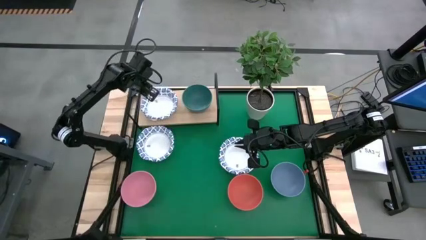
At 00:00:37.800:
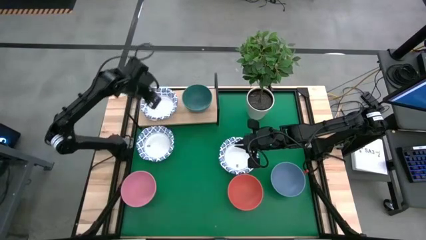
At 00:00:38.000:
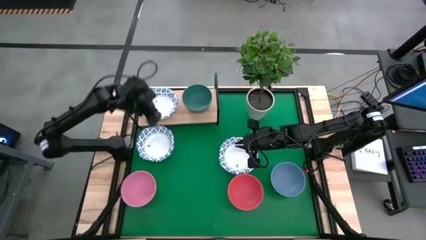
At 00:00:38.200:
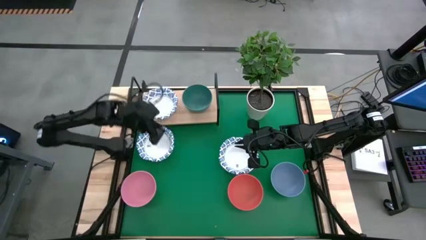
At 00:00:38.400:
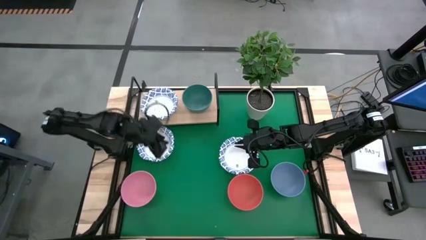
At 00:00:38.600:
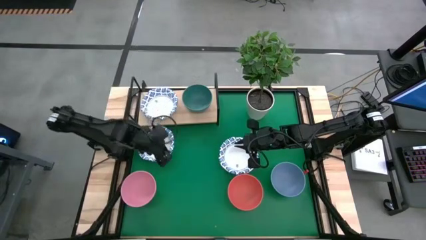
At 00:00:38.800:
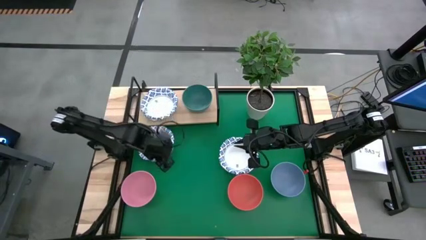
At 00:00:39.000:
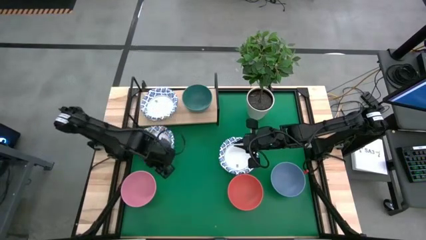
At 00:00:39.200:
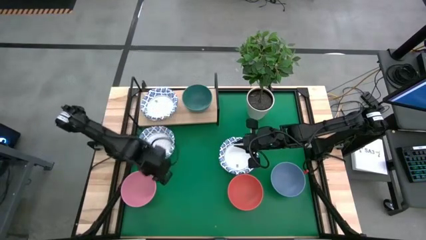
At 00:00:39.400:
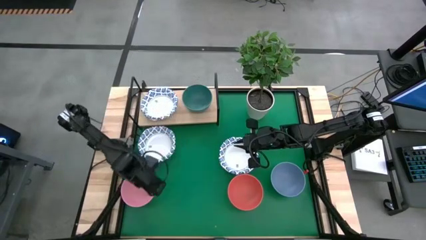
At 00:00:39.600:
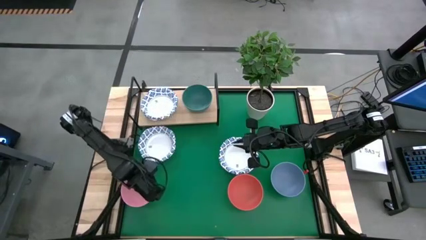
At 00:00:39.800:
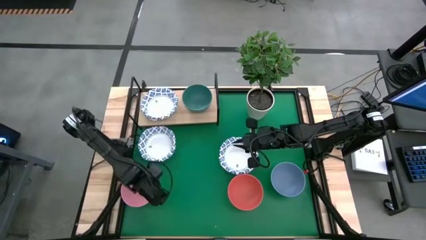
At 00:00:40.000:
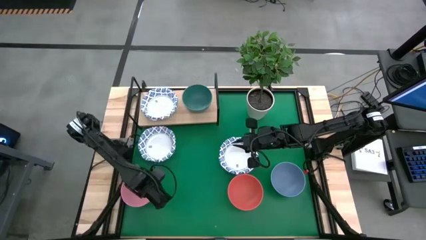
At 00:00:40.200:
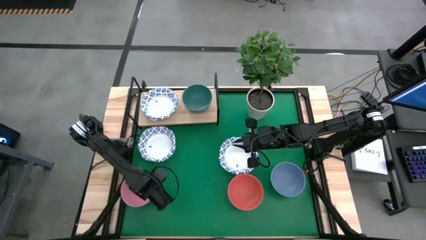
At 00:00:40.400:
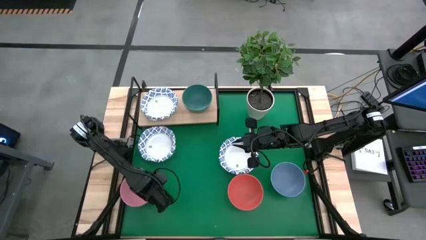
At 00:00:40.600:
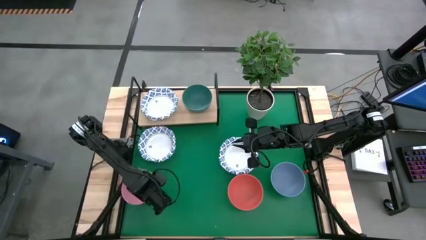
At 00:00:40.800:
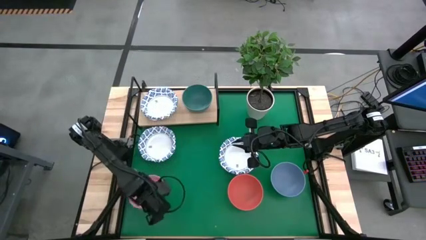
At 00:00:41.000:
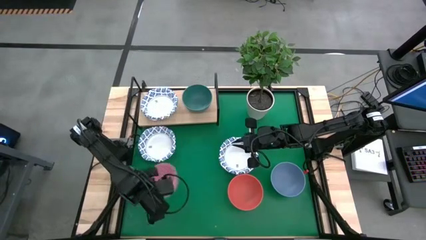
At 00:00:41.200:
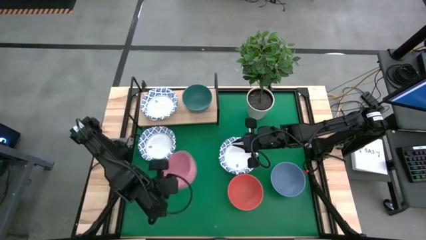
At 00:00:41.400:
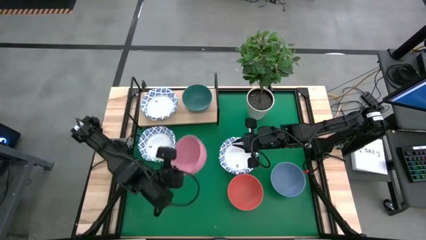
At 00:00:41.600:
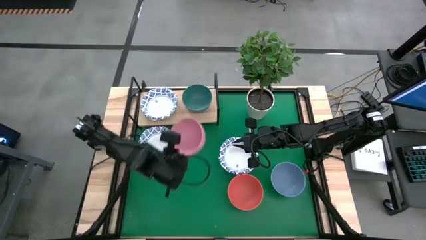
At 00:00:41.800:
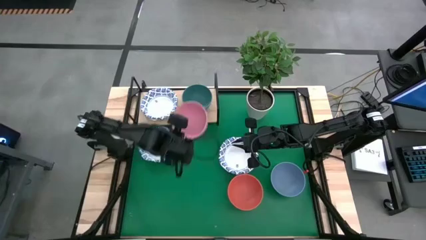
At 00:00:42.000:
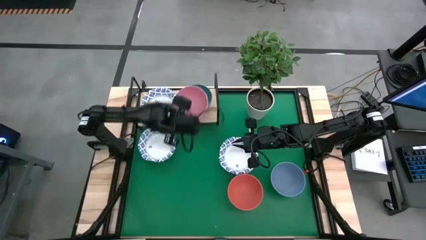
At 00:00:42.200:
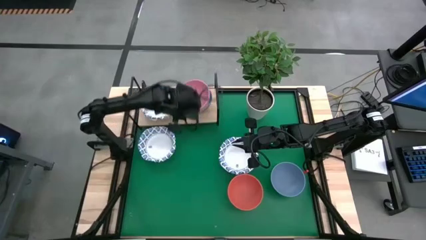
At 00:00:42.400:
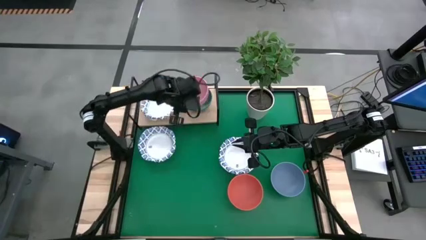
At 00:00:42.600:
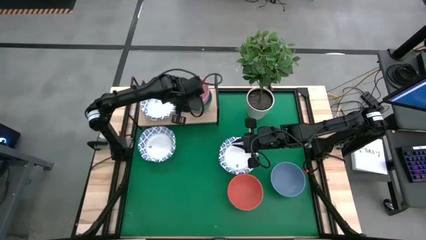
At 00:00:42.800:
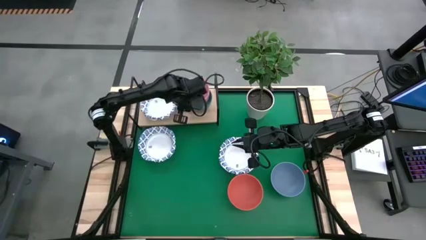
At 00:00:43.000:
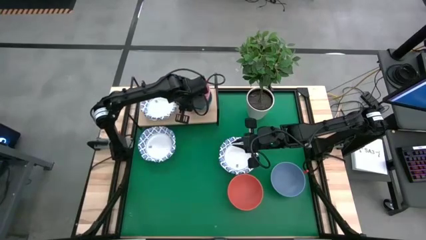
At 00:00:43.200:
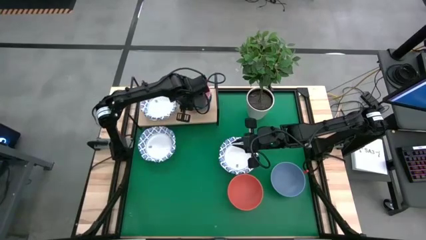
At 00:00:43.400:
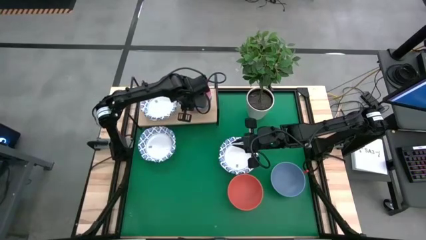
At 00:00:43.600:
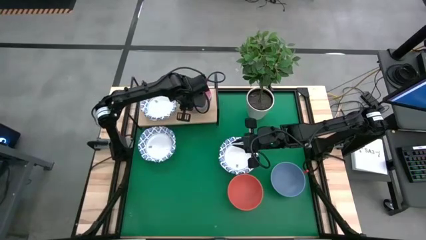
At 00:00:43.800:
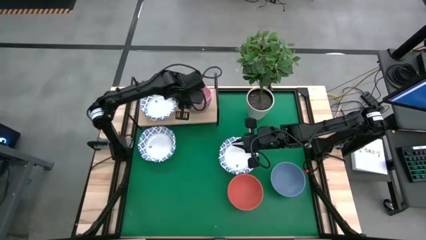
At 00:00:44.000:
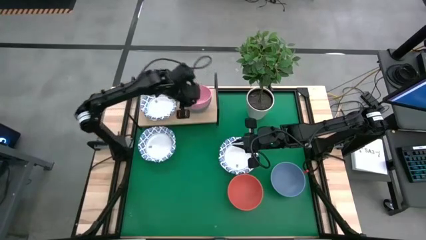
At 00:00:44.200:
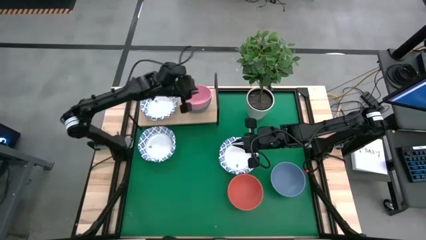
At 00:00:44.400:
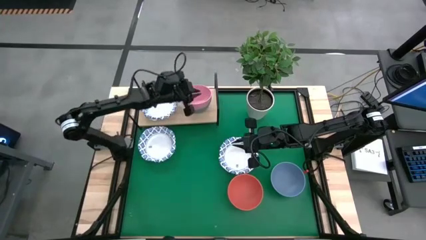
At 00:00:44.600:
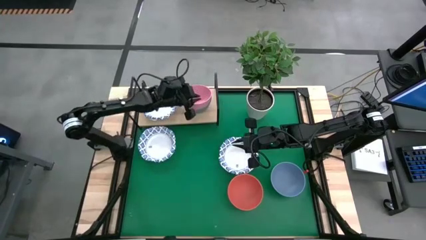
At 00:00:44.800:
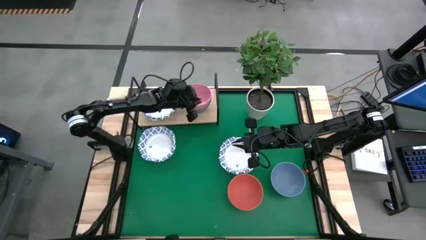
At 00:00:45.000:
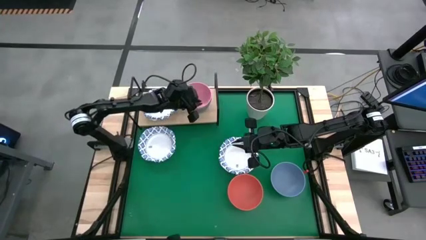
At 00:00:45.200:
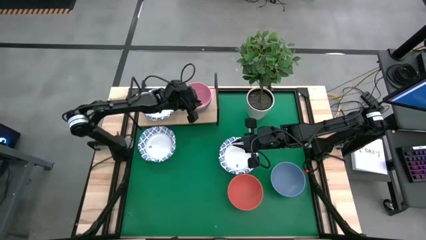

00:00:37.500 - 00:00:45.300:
Task: Place and stack bowls onto a shelf
Stack the pink bowl on top of the green bowl

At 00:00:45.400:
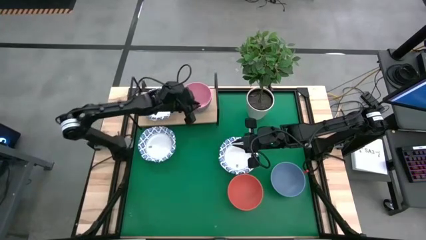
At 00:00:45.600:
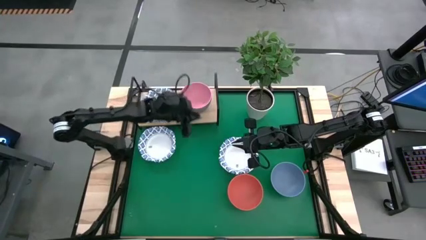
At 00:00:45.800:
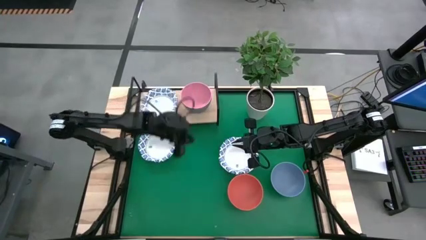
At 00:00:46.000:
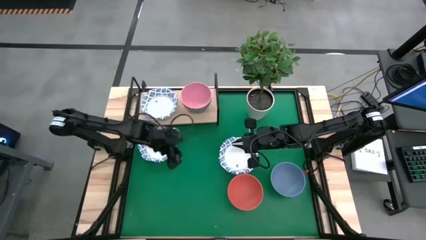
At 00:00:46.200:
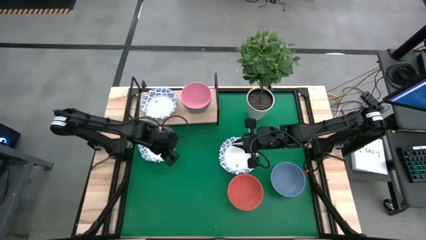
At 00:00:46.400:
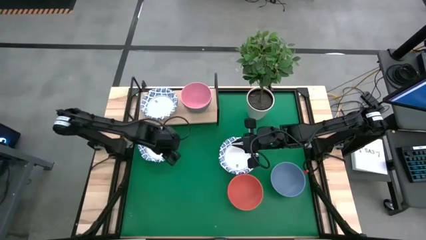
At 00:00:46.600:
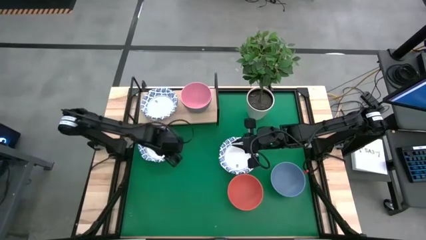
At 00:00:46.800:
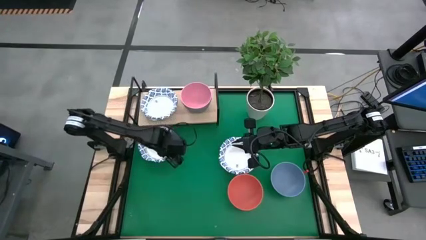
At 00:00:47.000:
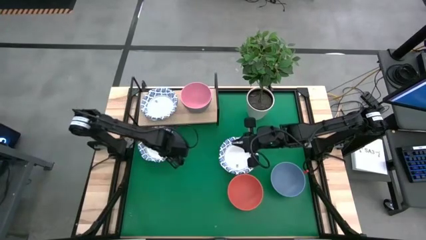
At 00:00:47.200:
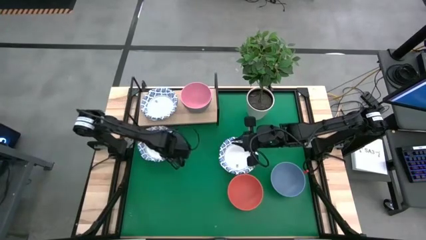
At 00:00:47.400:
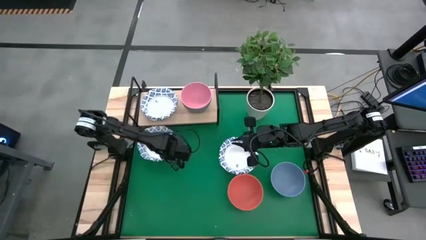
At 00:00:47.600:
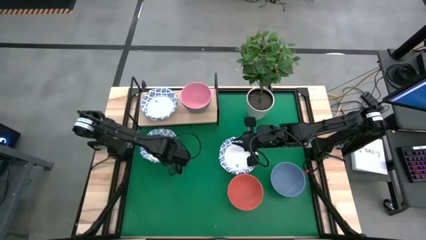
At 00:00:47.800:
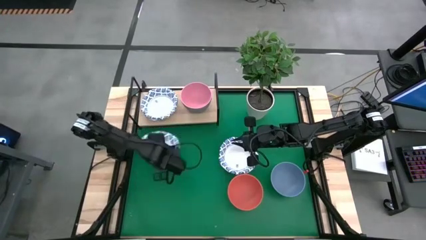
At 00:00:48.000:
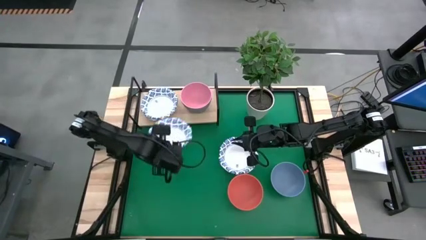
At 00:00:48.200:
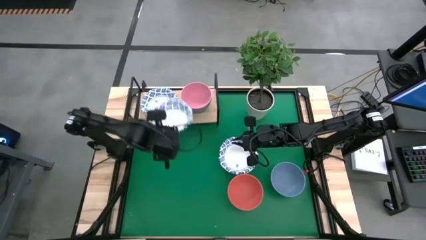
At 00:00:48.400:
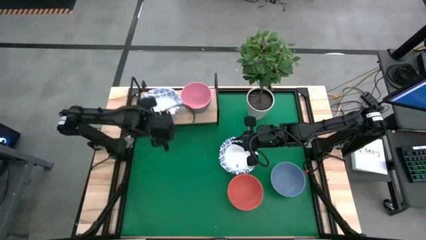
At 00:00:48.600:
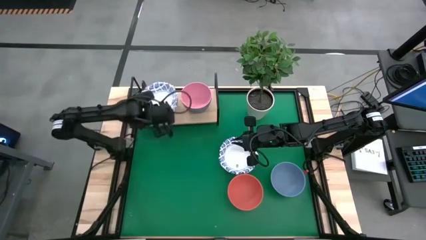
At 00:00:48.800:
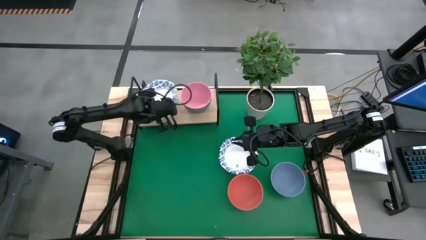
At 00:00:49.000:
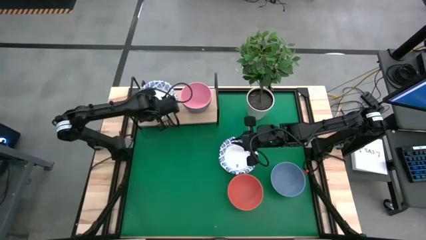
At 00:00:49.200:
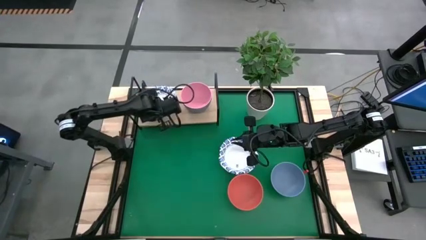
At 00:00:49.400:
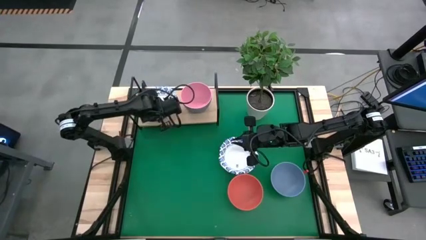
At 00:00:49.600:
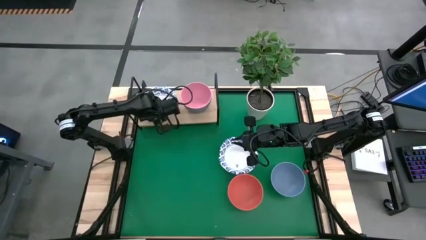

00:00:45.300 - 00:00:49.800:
Stack the white and blue bowl on top of the white and blue bowl

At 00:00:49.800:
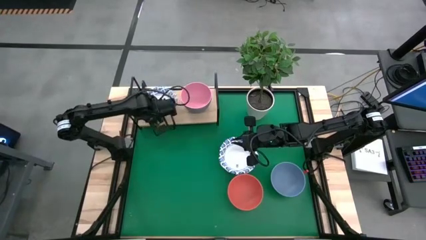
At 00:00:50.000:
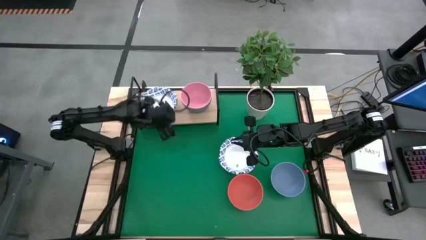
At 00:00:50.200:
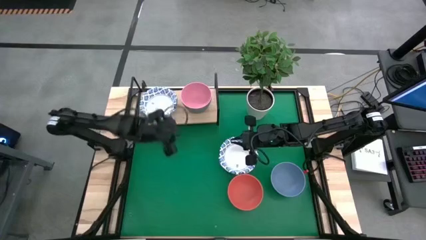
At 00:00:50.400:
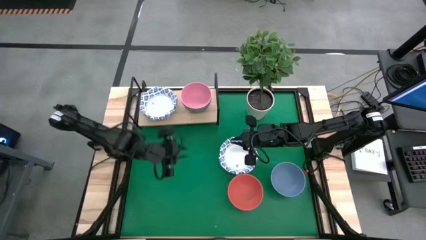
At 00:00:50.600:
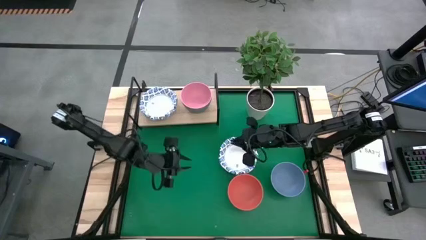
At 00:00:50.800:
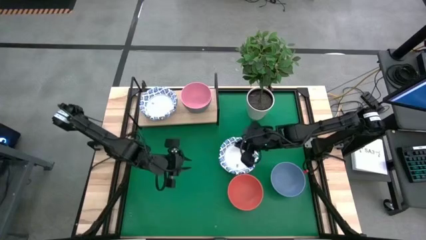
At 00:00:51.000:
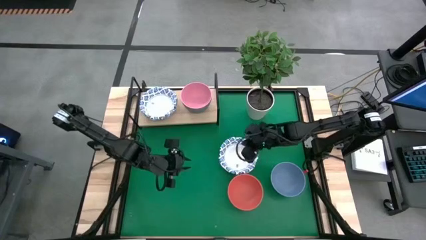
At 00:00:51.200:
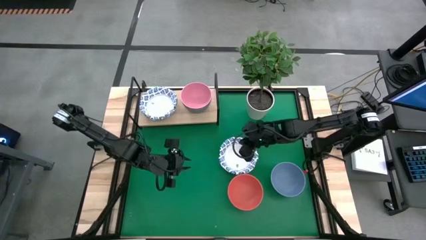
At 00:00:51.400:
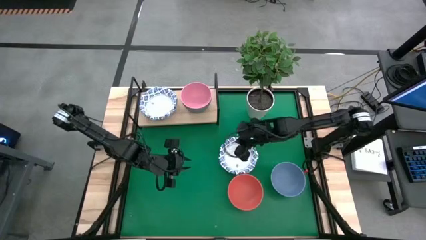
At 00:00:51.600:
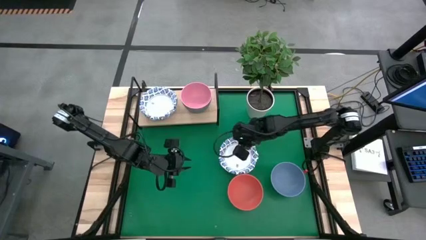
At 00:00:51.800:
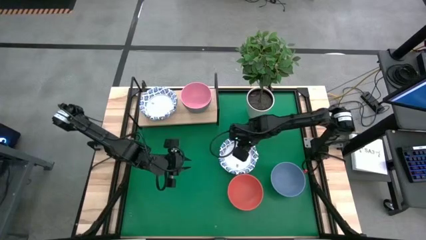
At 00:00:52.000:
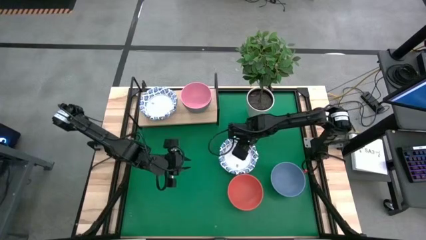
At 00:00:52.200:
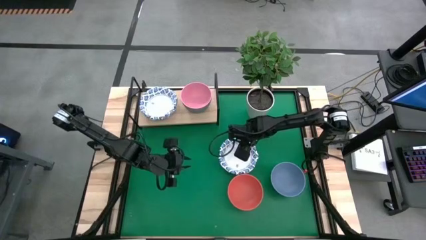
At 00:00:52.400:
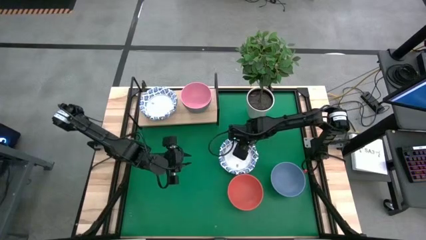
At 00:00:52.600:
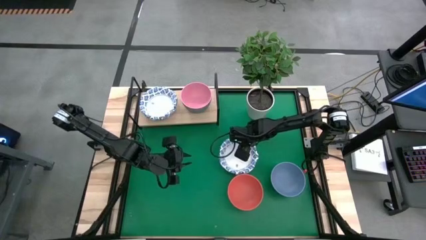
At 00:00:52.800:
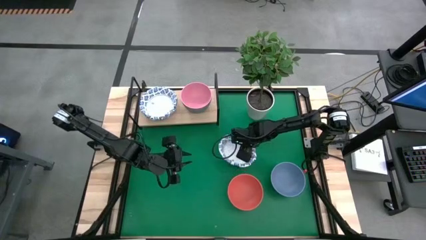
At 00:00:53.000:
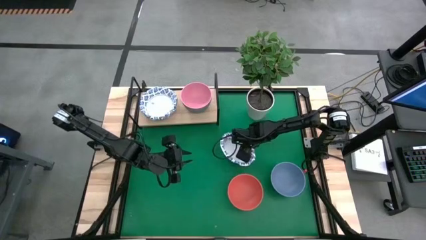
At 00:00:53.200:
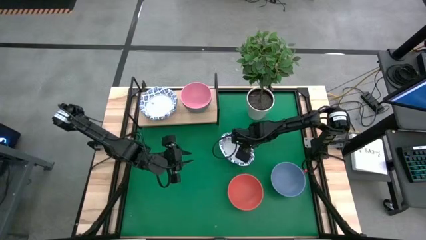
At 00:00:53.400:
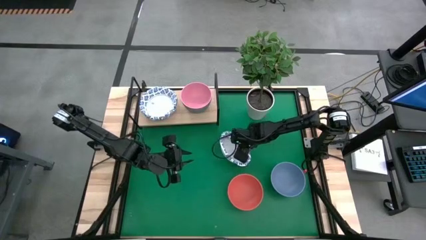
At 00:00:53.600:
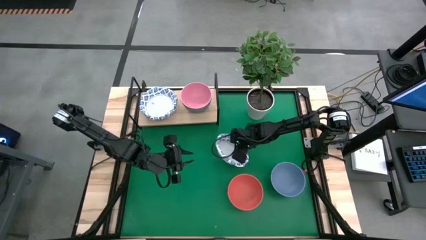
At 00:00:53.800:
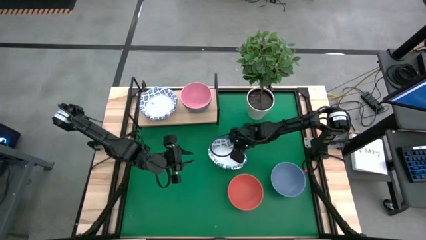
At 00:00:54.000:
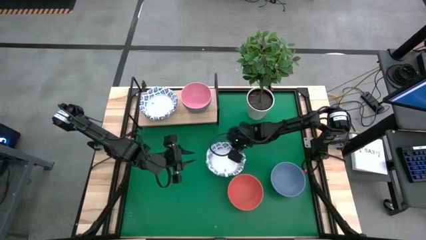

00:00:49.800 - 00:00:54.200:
Stack the white and blue bowl on top of the white and blue bowl
